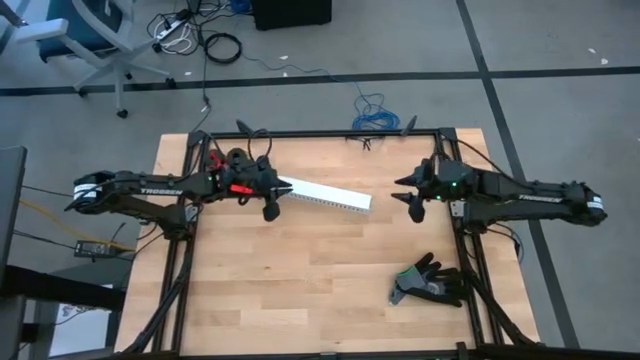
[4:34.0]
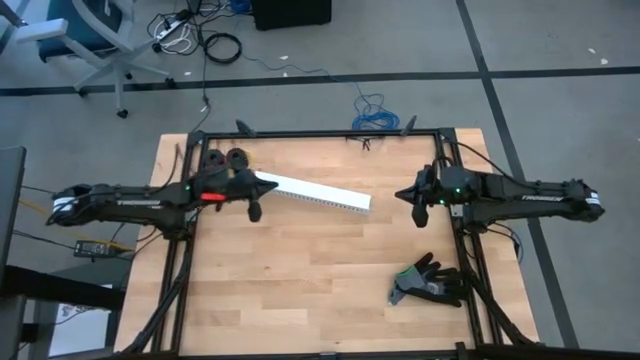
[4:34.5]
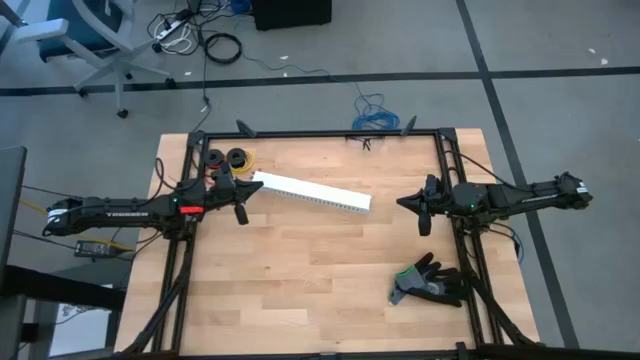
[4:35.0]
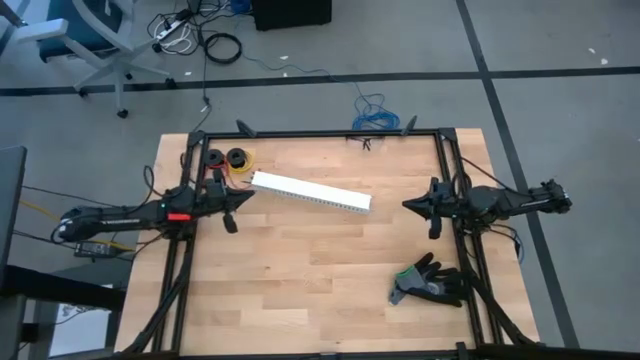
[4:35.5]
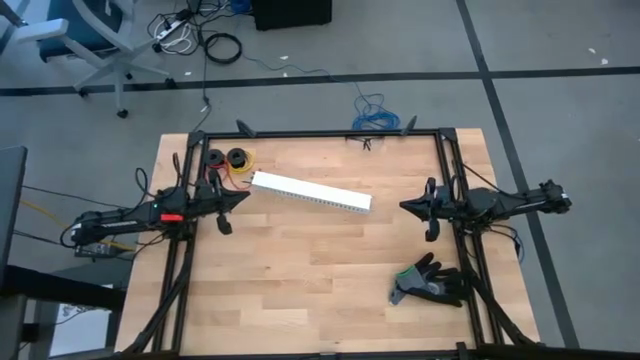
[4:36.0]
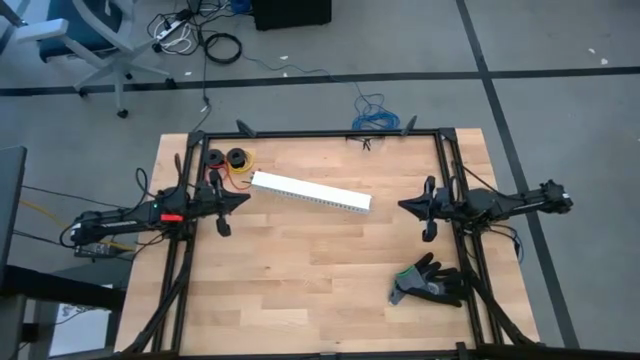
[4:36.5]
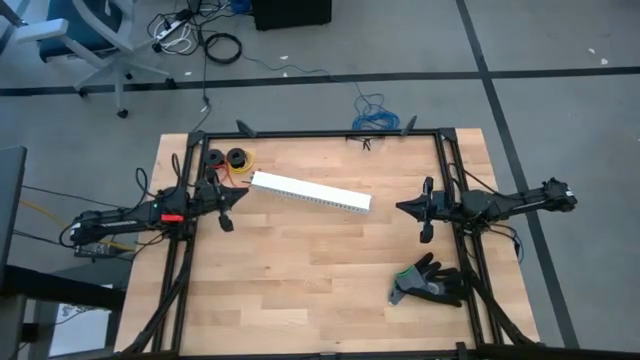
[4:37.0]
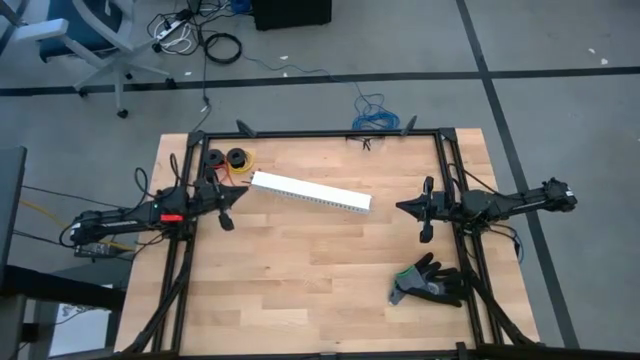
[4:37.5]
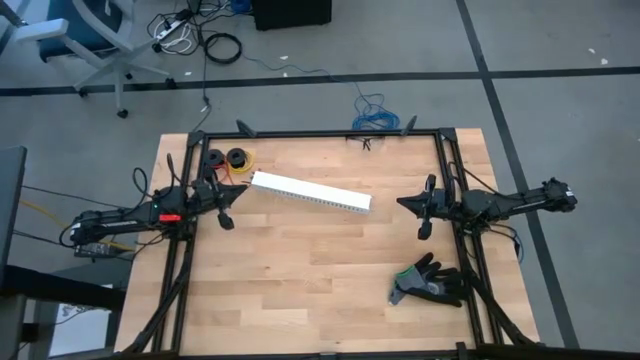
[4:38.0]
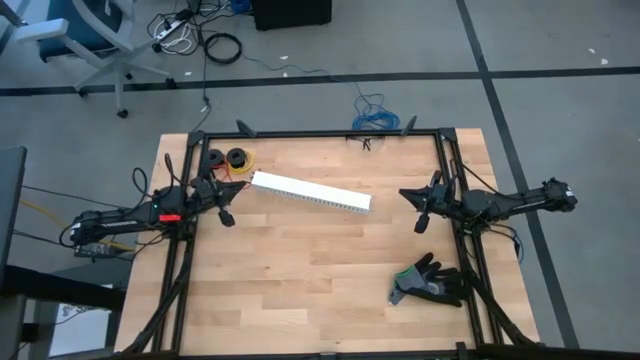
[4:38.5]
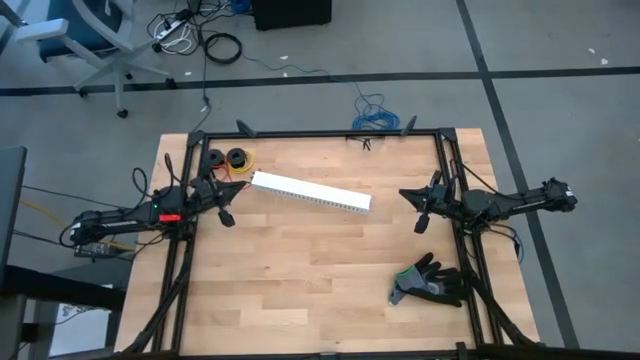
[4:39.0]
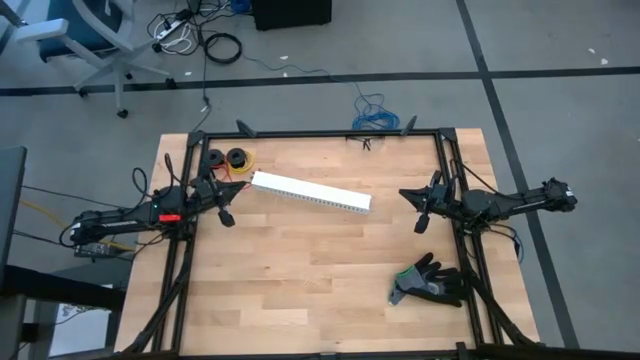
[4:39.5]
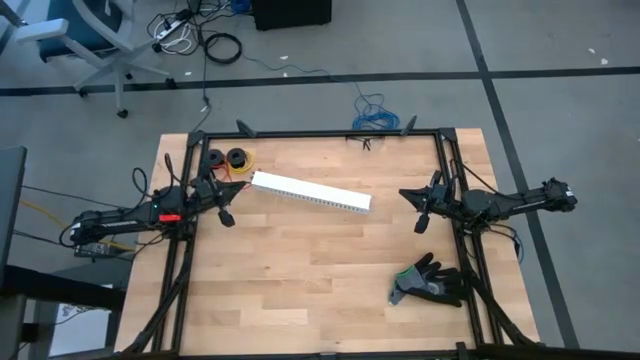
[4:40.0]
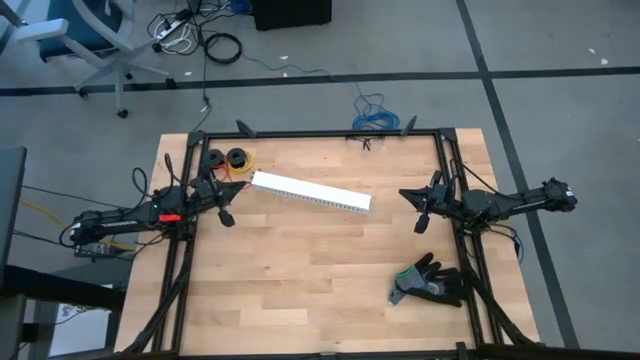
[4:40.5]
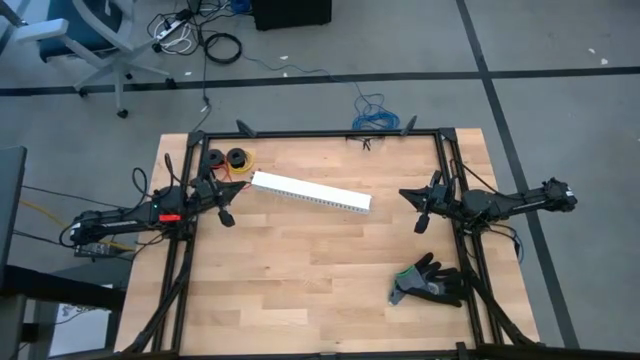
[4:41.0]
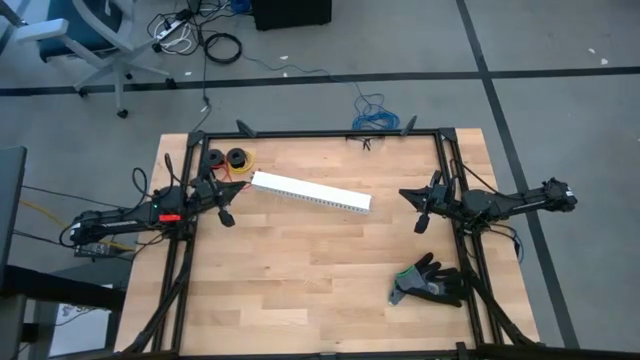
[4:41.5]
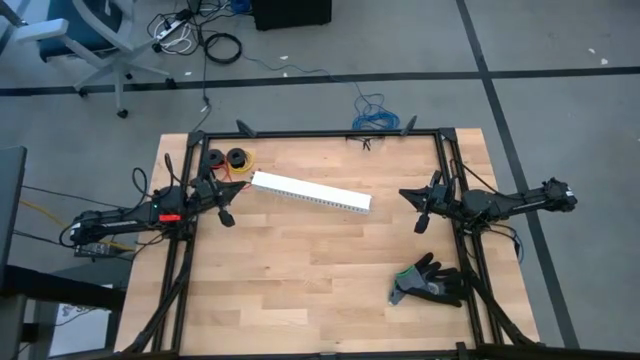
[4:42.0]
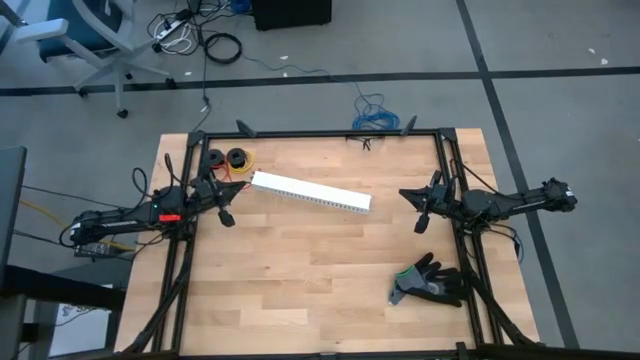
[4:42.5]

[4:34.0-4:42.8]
Task: Ziptie cables
Return to Home Position

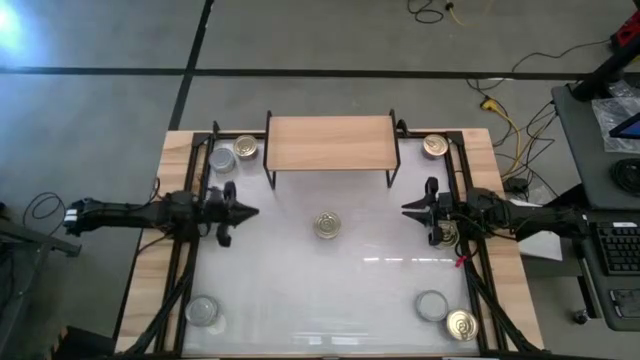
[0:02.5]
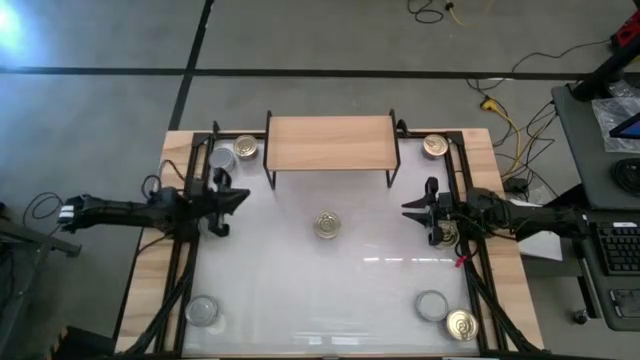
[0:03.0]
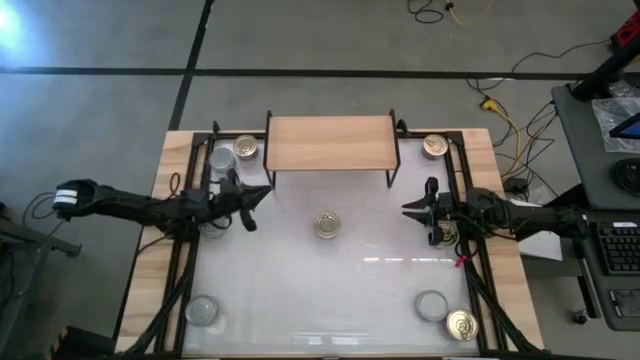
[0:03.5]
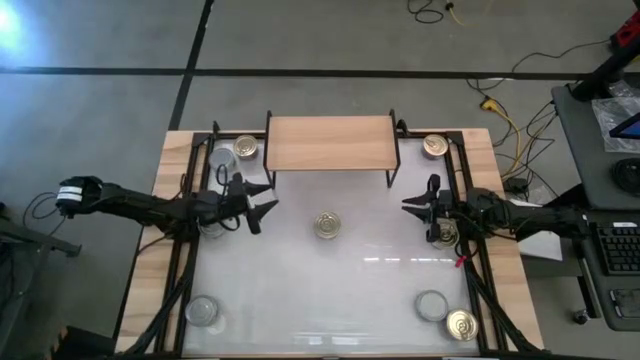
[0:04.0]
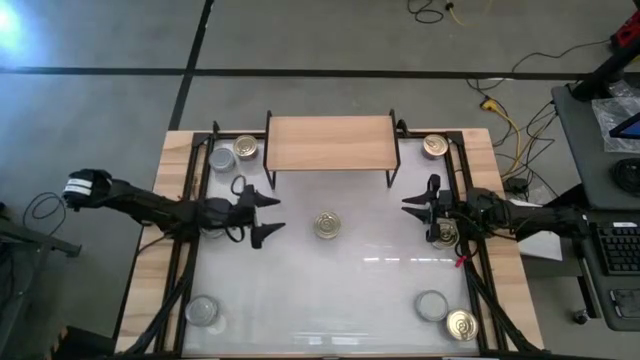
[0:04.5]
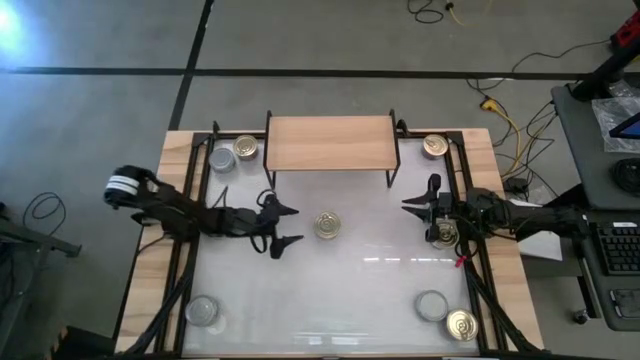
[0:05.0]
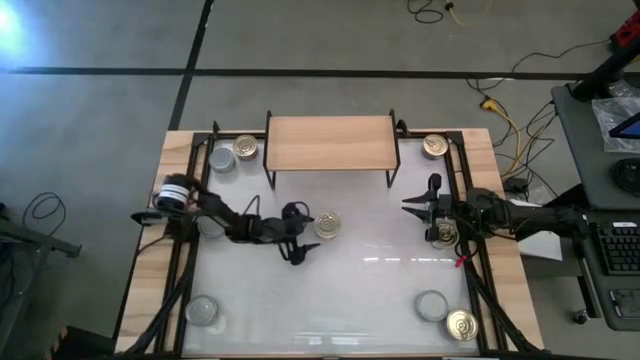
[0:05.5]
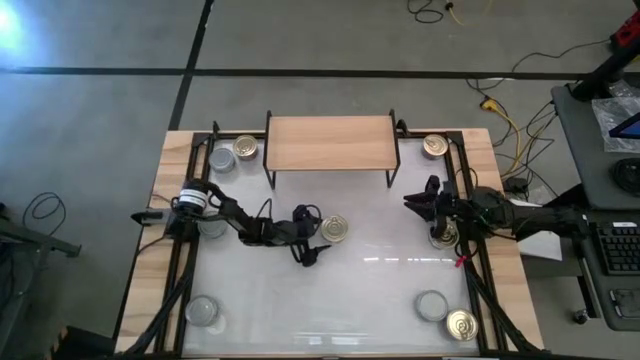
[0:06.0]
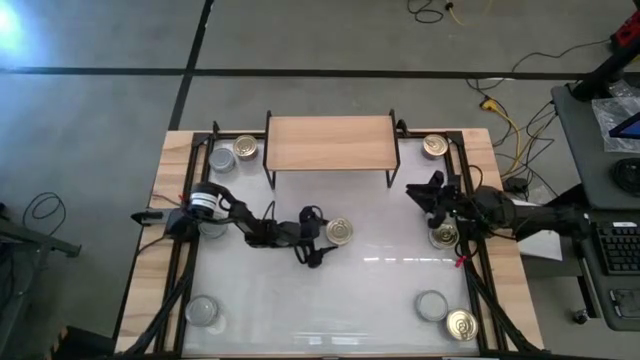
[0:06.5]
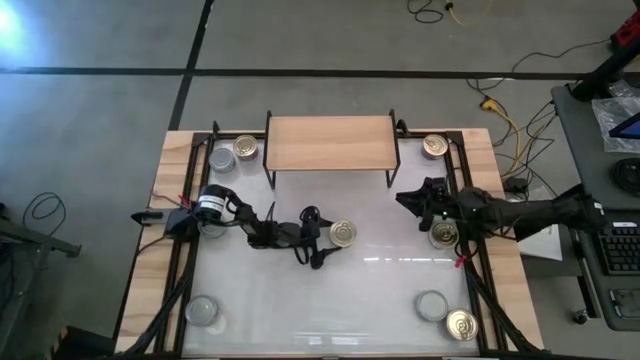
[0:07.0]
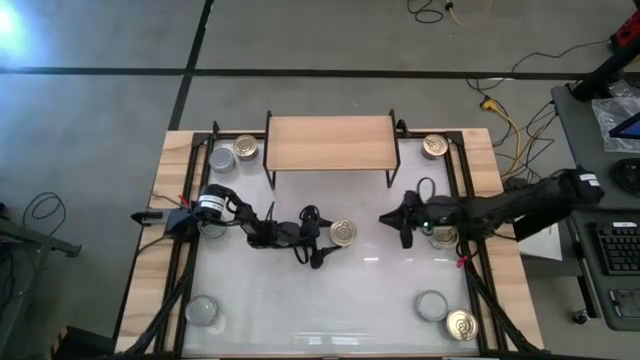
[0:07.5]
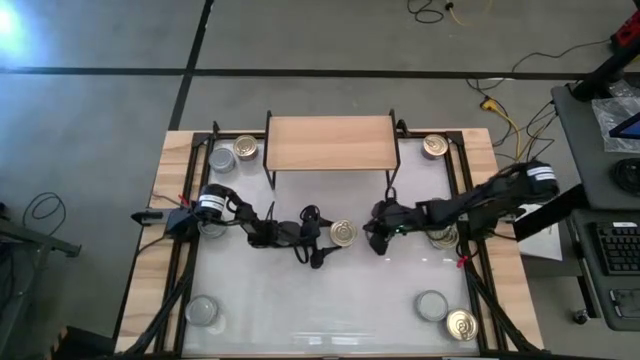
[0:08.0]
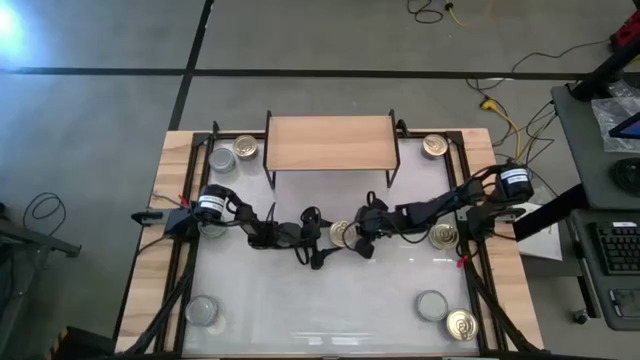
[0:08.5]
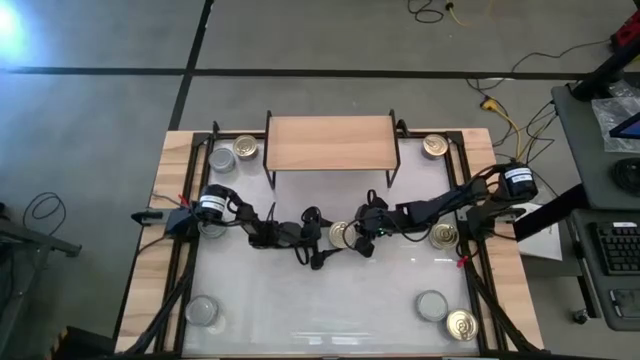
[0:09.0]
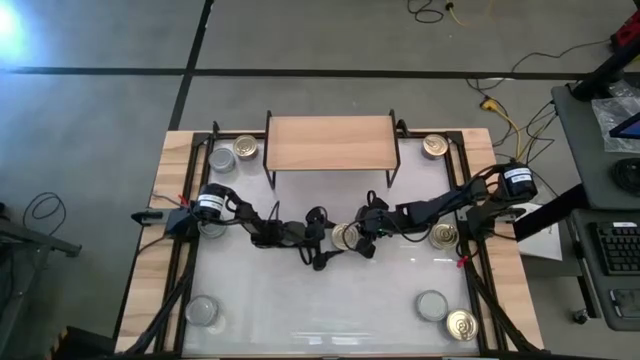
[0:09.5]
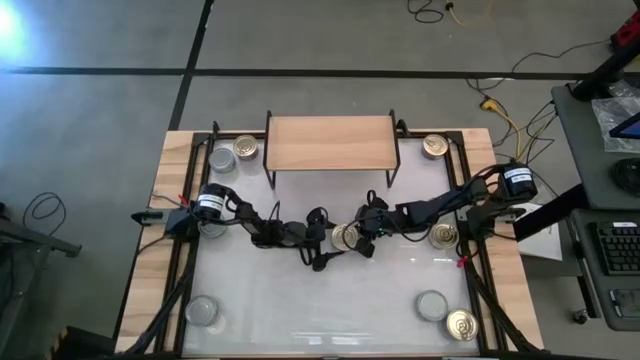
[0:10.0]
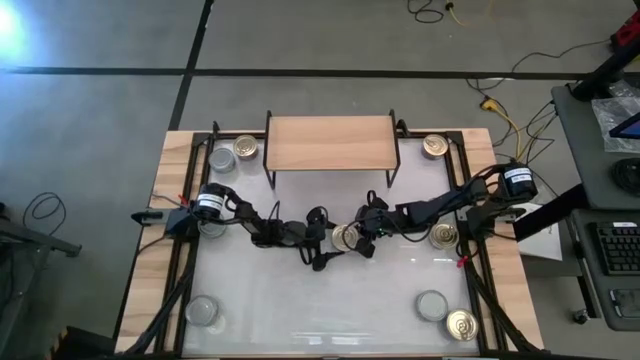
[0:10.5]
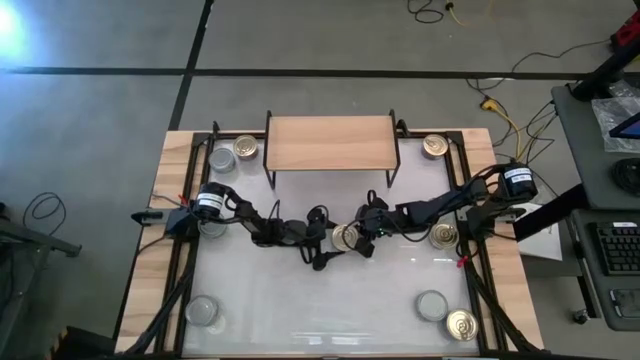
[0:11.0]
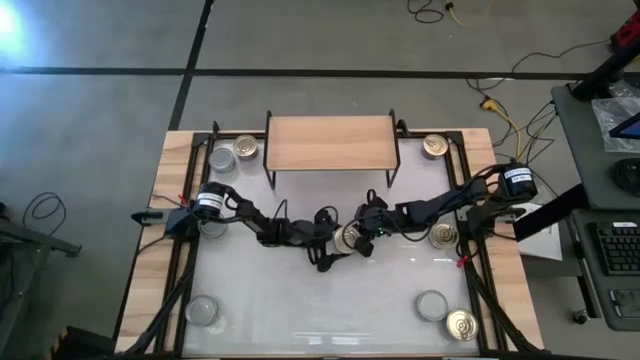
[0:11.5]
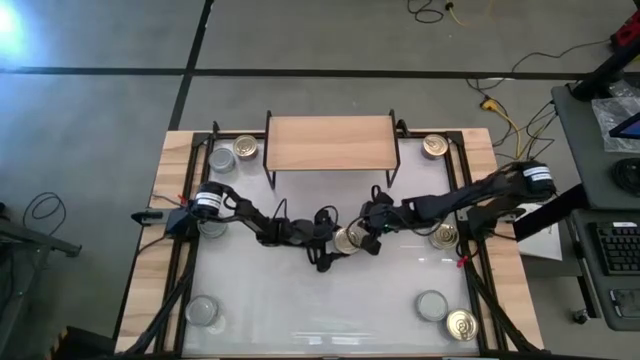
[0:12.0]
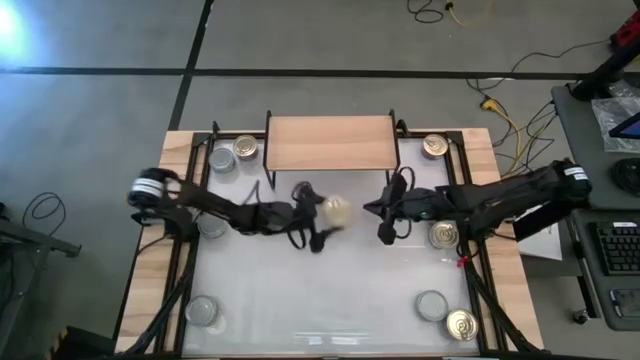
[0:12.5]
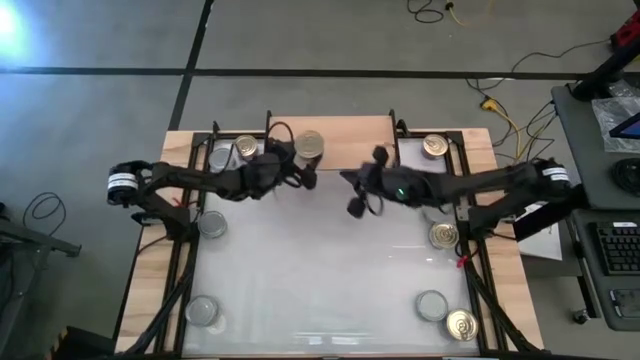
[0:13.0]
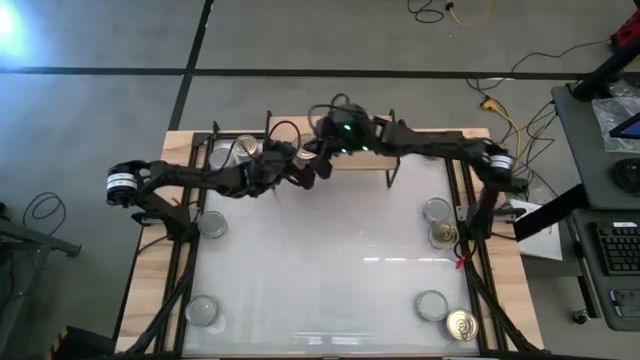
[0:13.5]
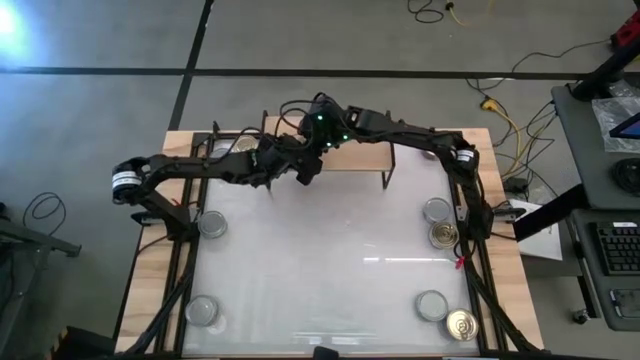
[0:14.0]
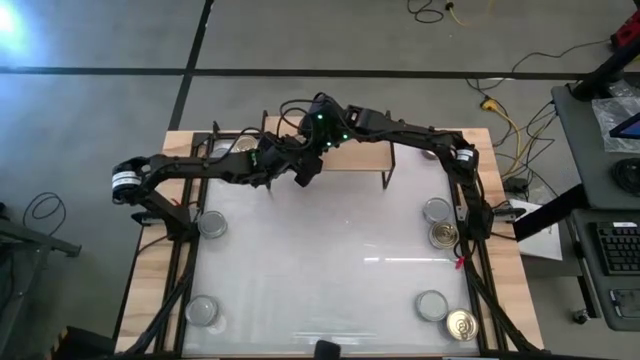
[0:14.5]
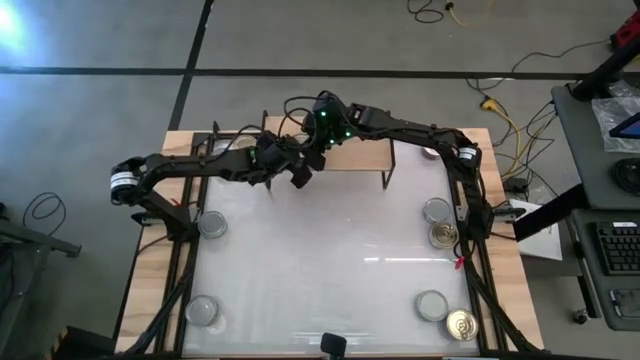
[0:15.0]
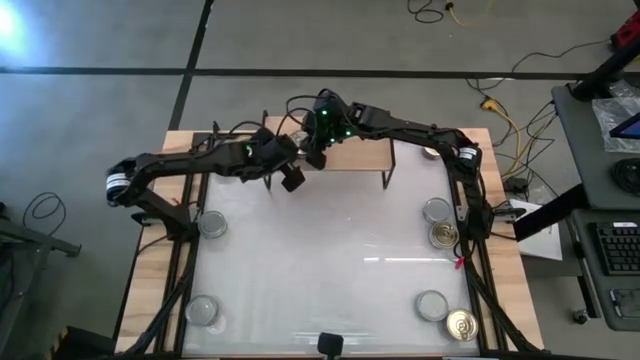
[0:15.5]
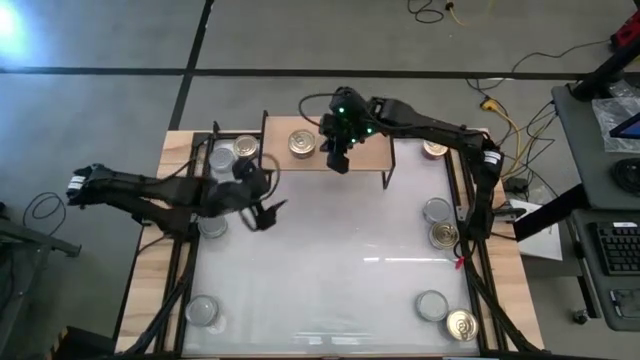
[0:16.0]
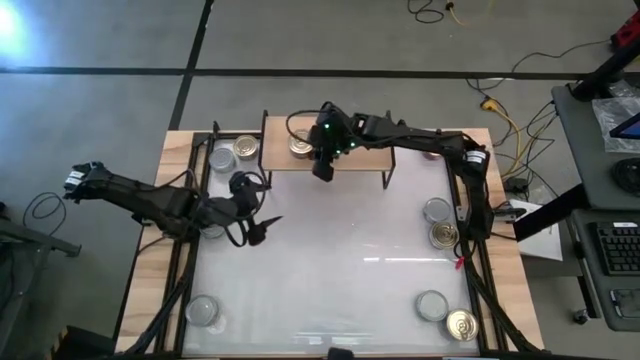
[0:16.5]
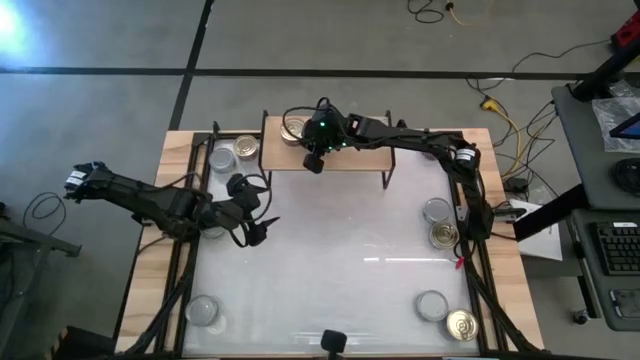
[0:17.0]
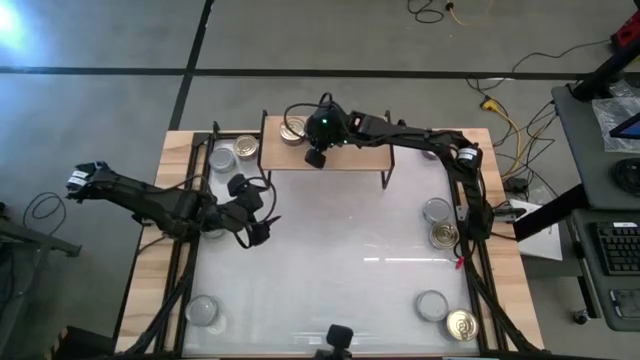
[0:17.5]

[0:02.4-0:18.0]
Task: Stack canned seafood by type on shelf
Put the blue-pink tuna can on the shelf
